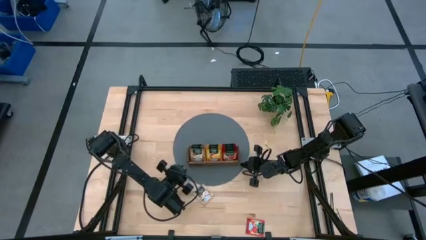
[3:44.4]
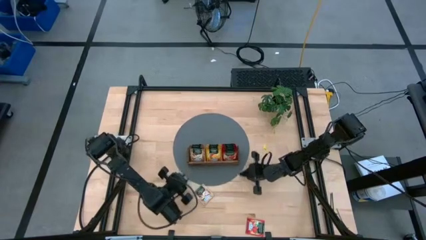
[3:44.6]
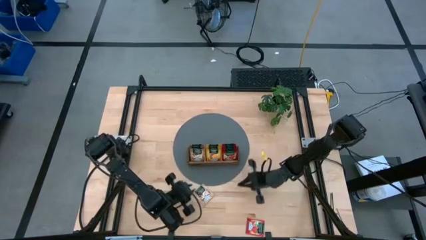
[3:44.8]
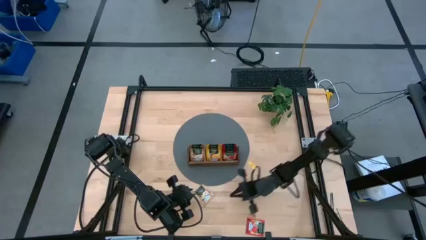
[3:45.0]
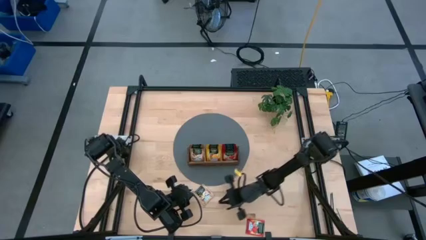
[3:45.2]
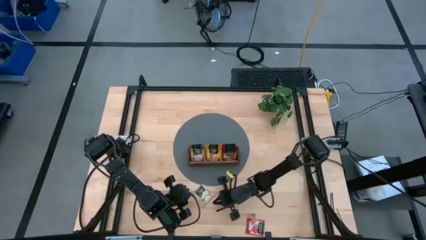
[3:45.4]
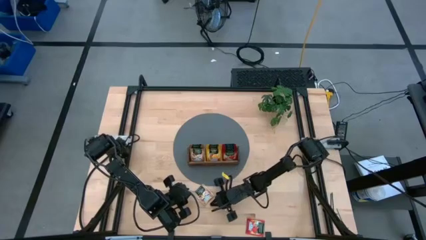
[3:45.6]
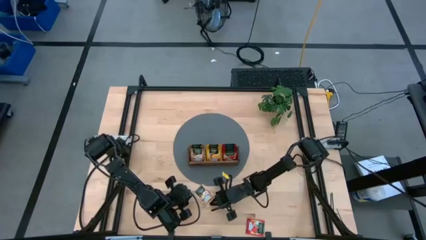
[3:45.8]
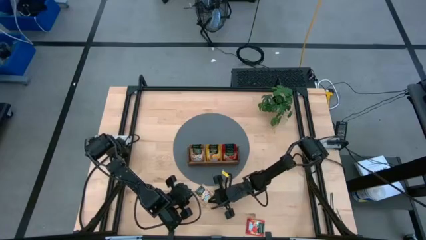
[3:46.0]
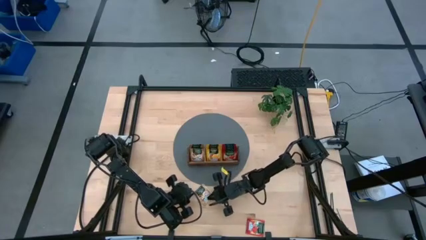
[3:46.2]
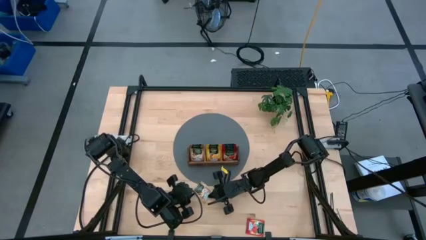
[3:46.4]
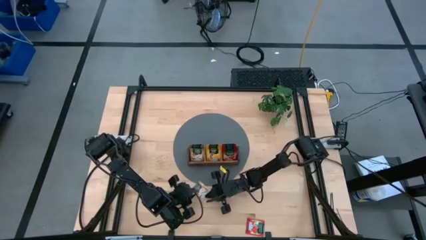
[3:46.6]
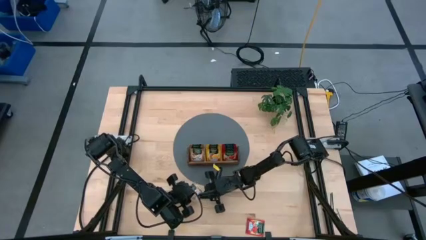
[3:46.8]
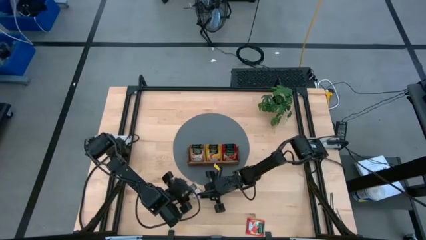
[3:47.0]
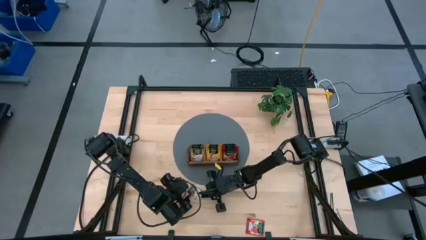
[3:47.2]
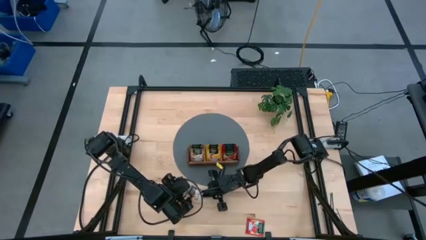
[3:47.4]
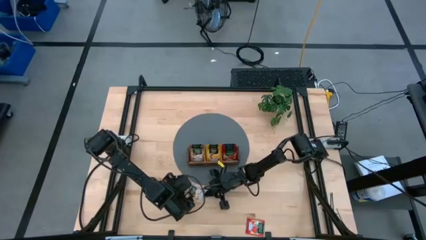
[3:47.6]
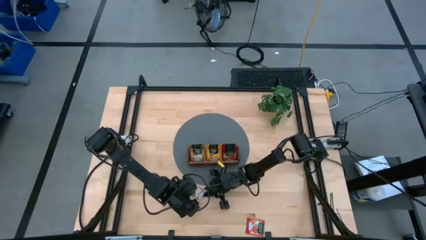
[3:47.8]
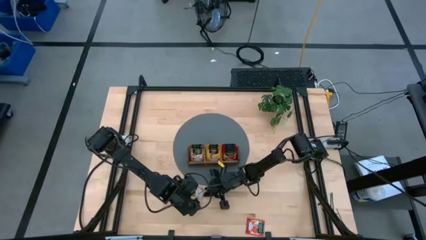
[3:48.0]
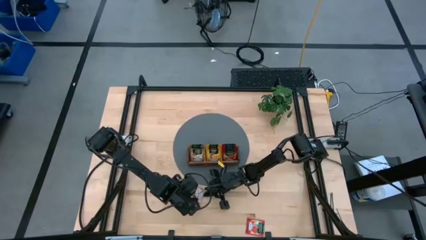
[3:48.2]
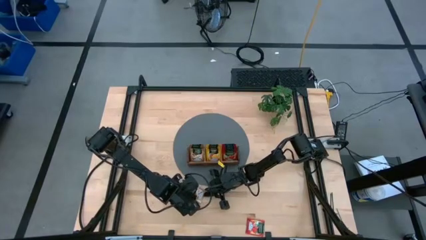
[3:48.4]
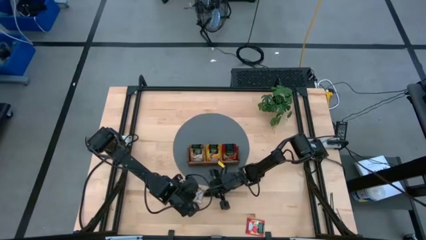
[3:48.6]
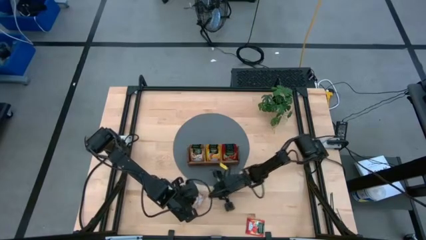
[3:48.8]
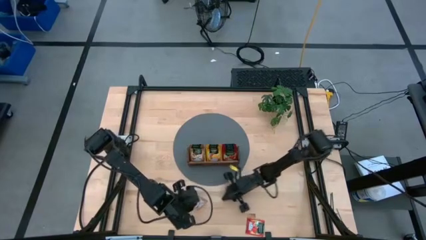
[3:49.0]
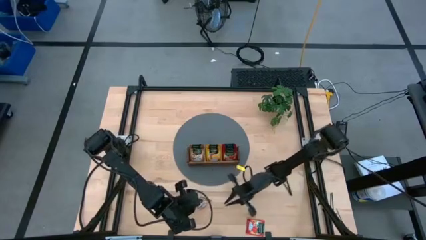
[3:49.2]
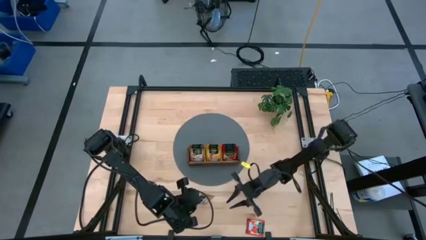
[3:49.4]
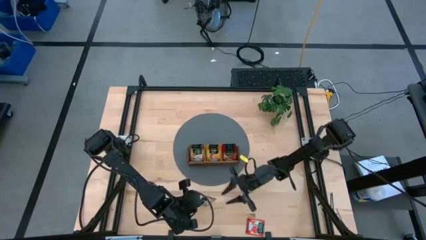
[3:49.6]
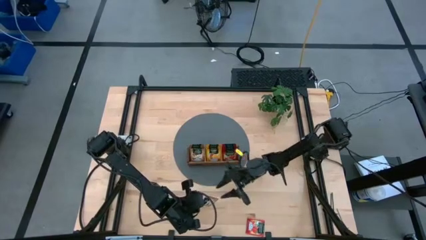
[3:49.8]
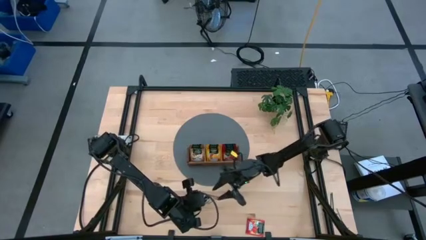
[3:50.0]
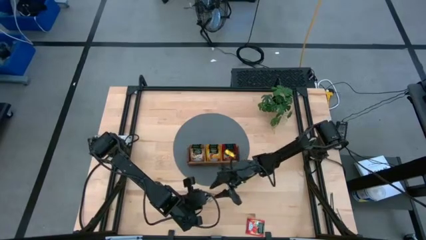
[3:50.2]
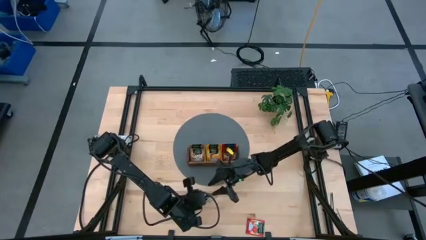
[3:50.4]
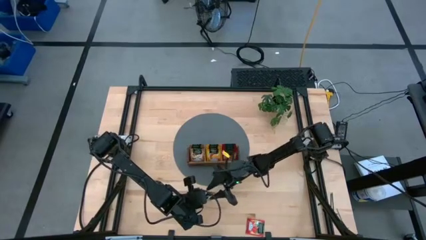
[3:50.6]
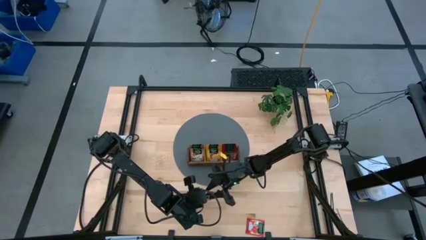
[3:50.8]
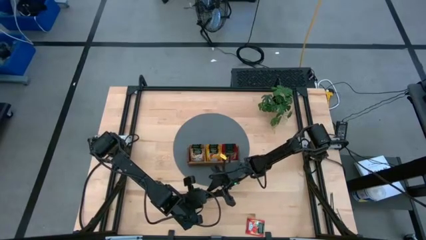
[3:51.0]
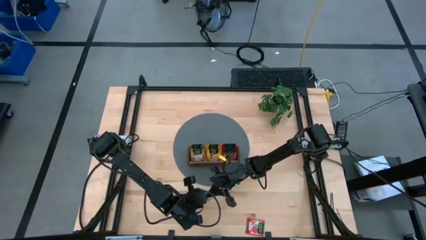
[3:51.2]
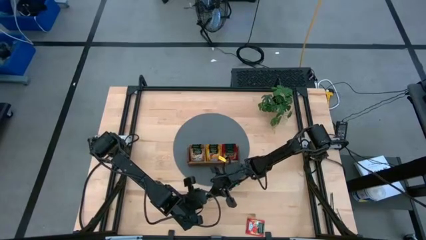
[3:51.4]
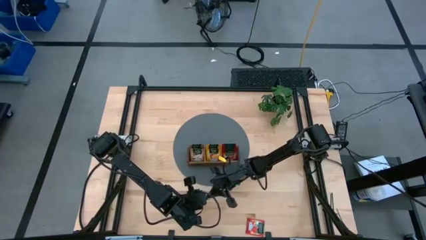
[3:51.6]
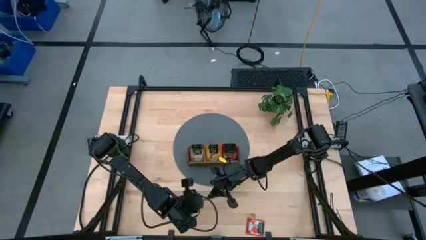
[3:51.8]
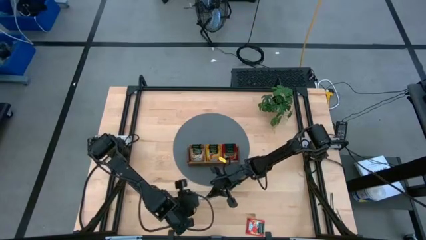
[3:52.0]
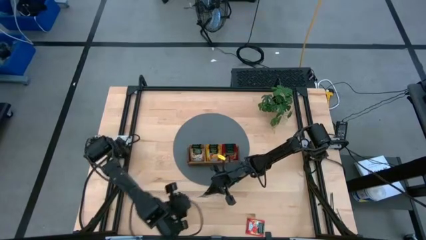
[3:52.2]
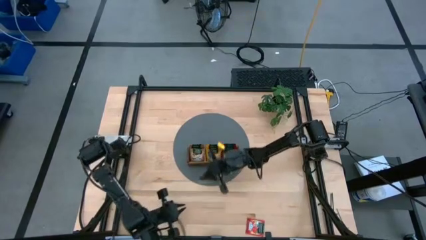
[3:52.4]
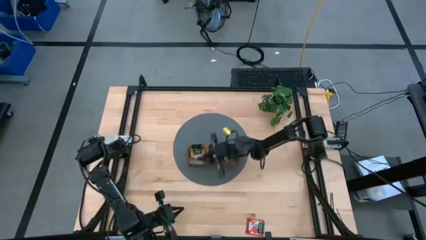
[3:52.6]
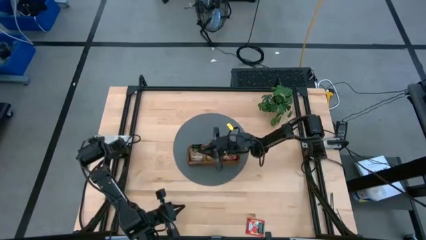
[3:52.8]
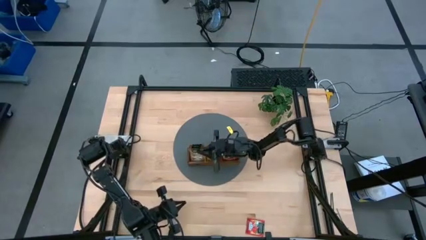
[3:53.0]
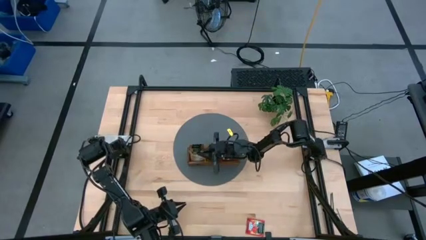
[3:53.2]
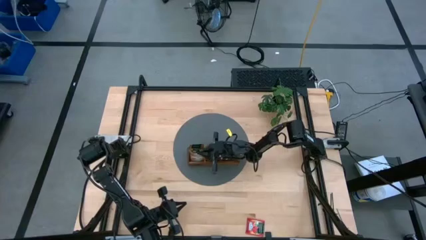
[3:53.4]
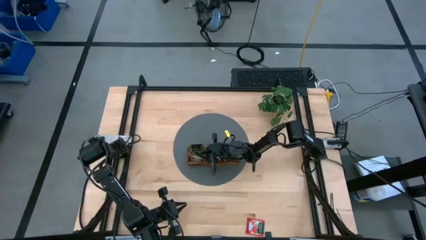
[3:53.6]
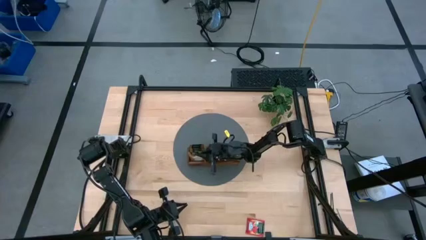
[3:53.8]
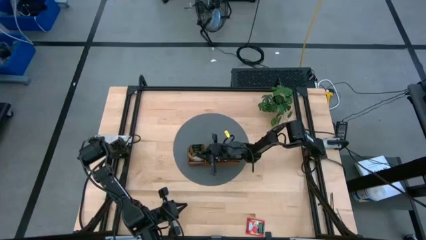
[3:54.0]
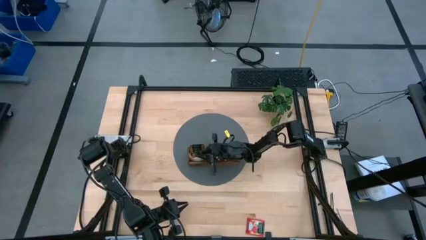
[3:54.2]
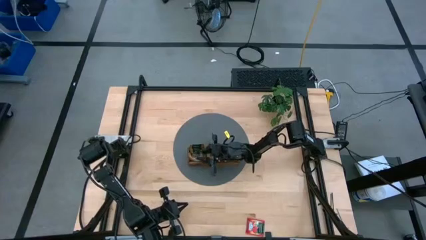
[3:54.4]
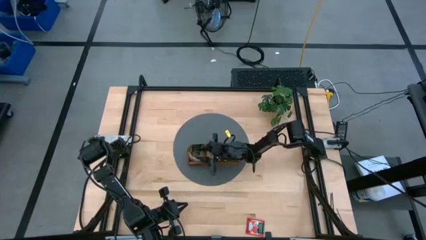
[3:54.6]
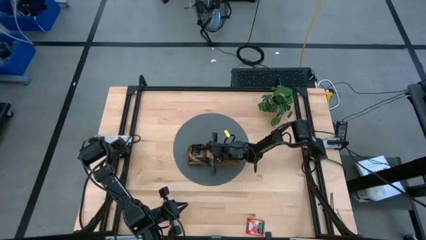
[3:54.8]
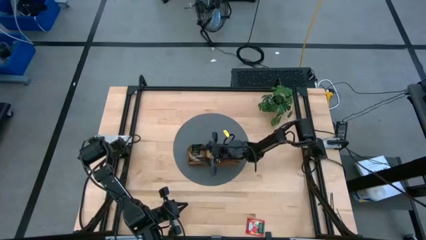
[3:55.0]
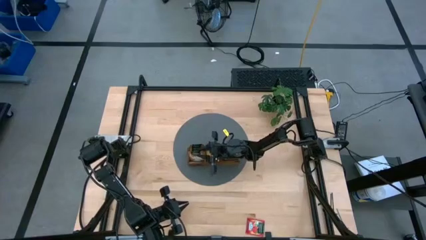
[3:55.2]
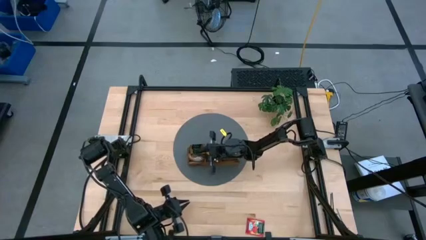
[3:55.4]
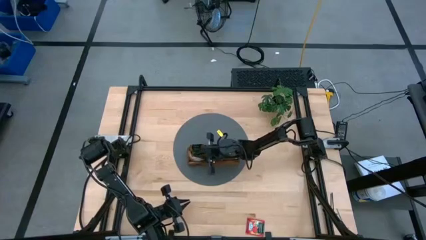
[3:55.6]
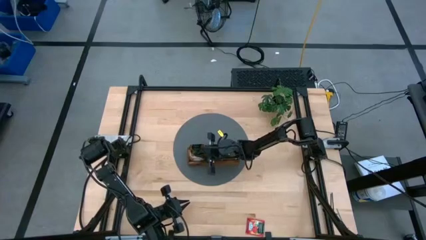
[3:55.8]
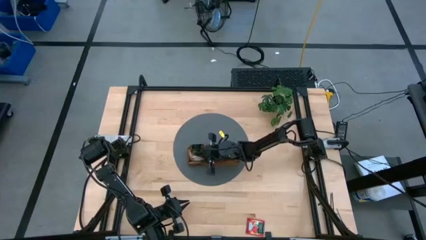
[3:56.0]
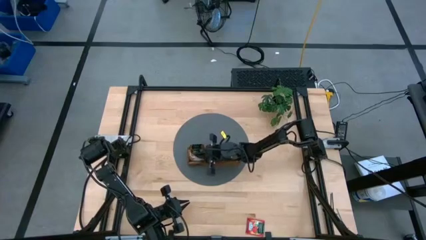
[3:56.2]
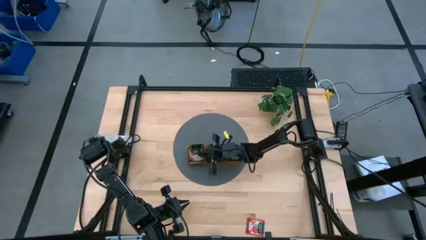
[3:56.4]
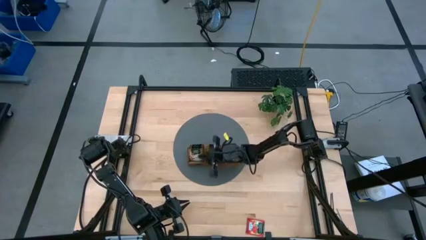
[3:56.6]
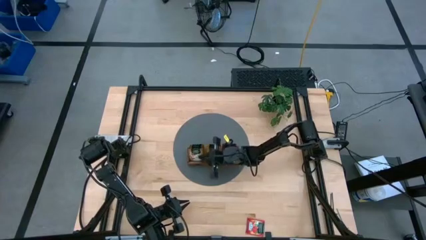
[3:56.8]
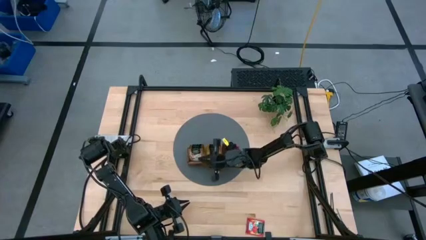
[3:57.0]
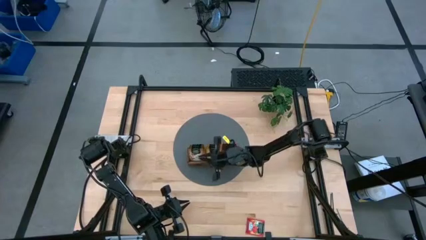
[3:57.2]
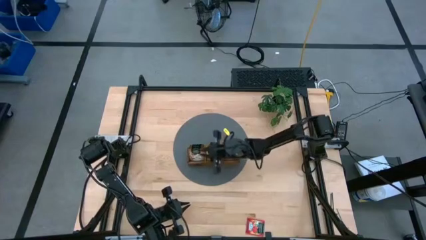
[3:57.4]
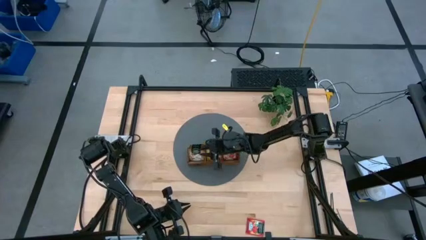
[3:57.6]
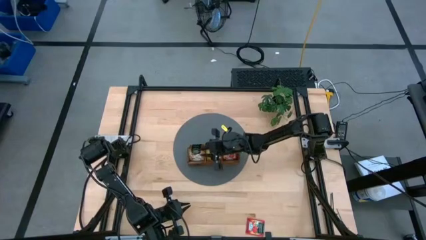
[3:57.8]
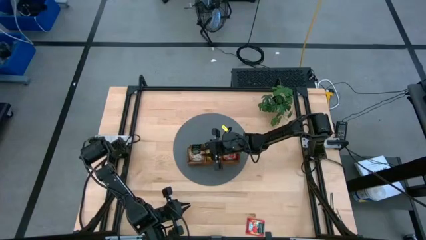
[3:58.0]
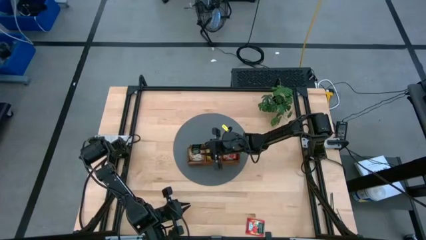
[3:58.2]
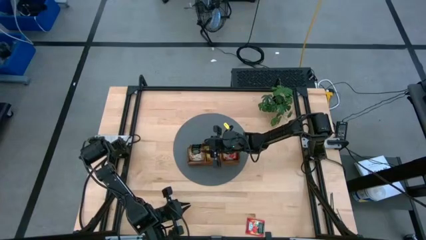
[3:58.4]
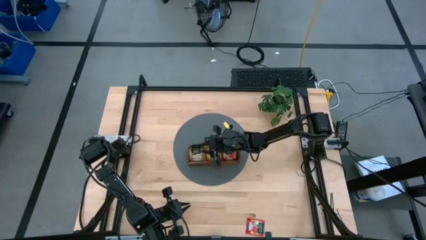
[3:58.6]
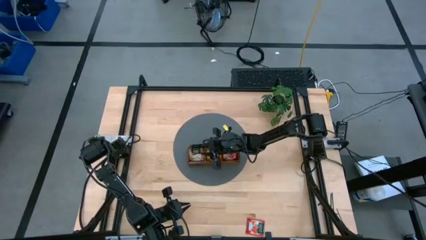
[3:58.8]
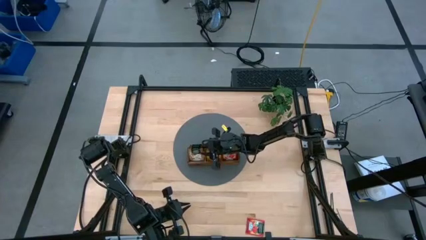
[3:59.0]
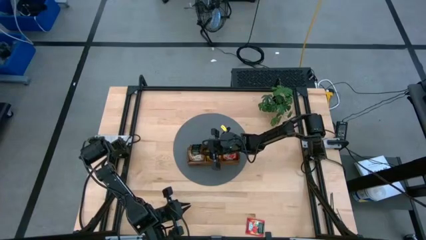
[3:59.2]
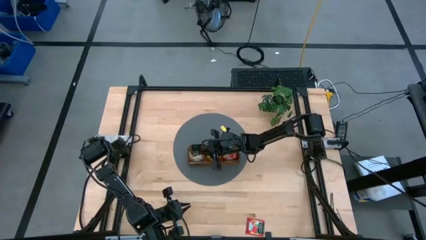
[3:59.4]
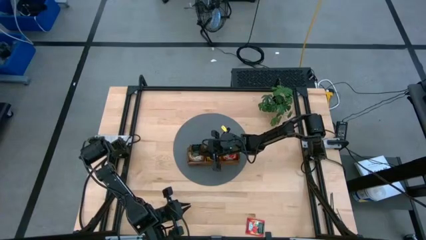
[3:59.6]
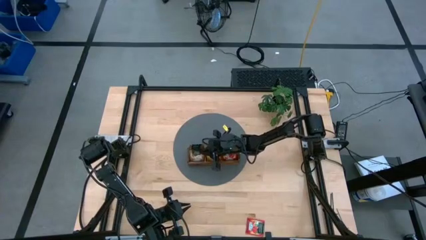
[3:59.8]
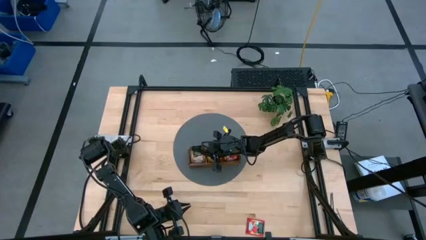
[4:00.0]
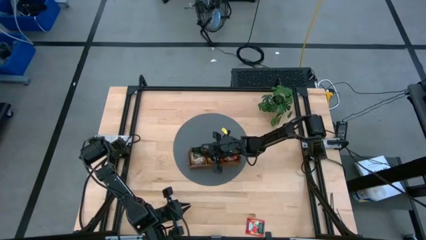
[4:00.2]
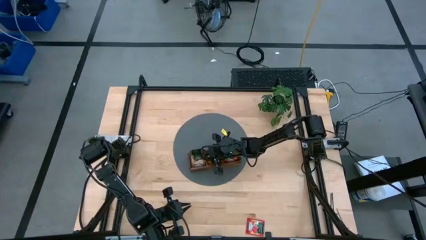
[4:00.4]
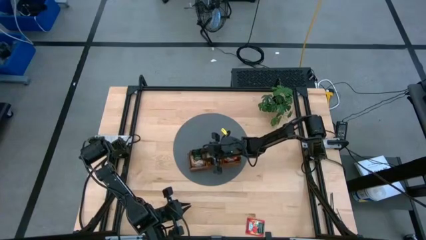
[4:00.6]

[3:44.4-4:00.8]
Task: Pick & Place Tea
Put the brown tea bag into the left section of the wooden organizer

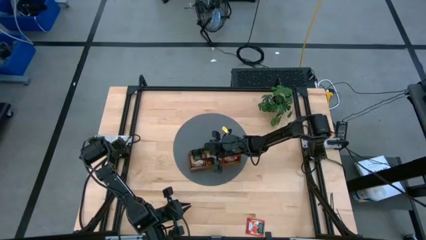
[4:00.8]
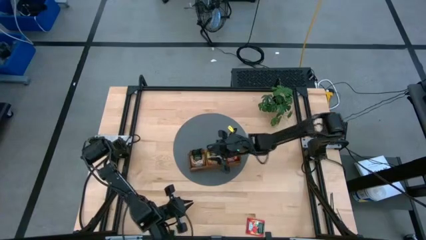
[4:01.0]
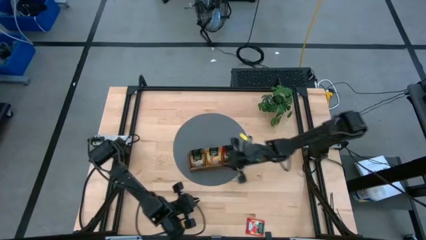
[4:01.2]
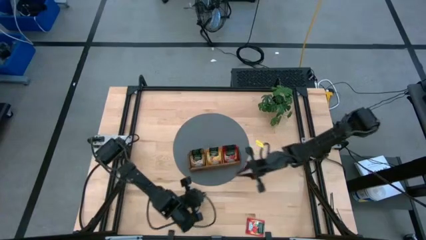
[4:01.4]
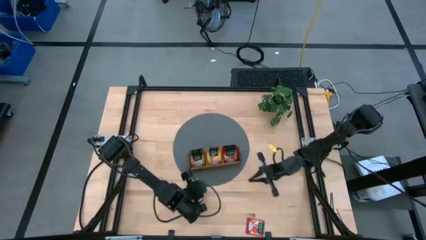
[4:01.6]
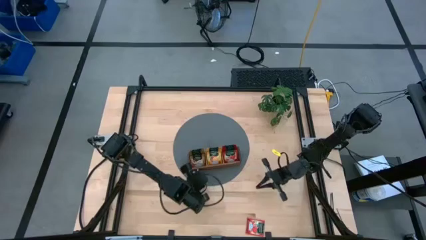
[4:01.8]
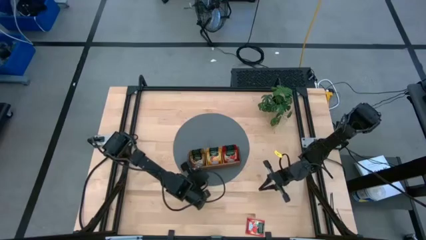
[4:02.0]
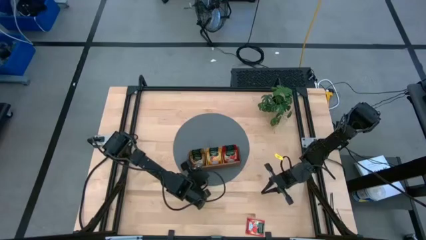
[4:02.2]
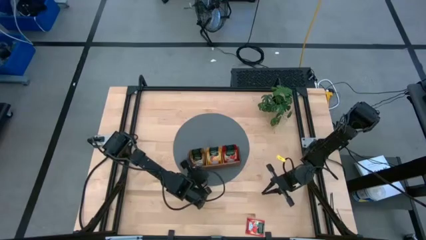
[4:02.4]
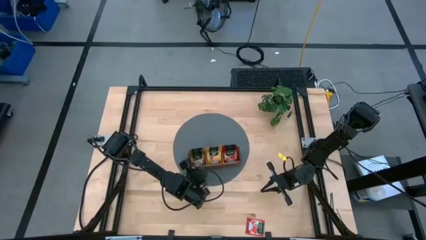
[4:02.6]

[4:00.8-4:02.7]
Adjust the wooden organizer
